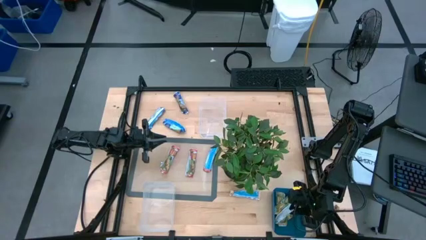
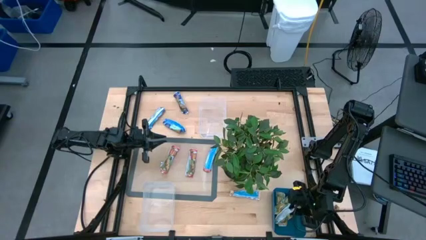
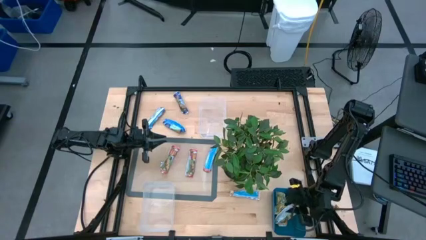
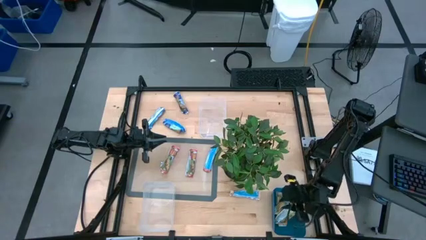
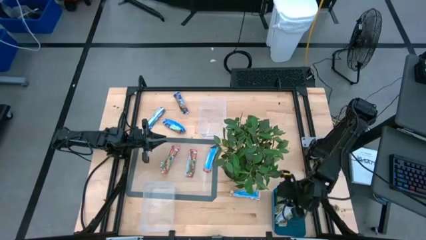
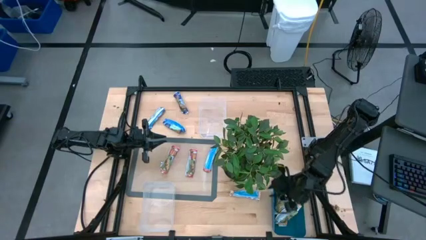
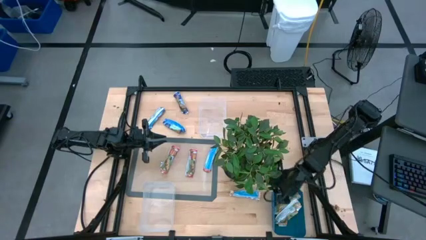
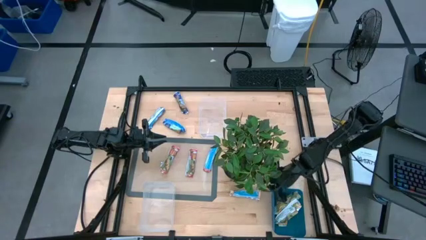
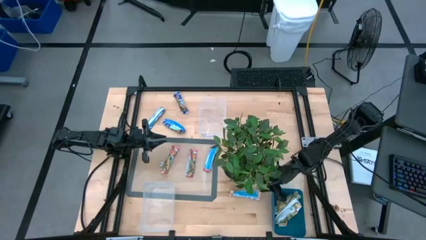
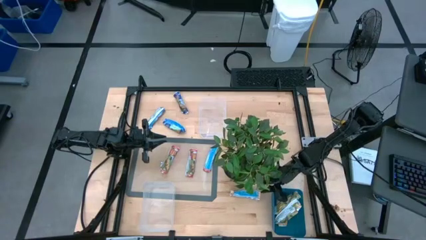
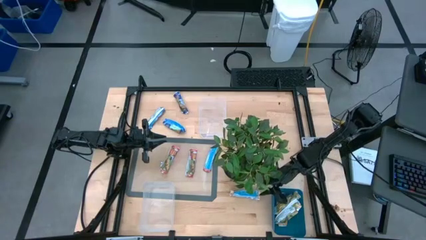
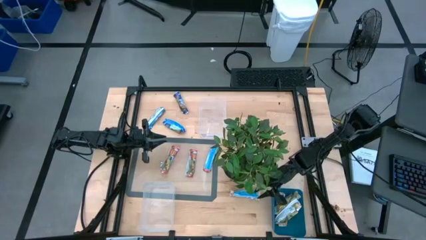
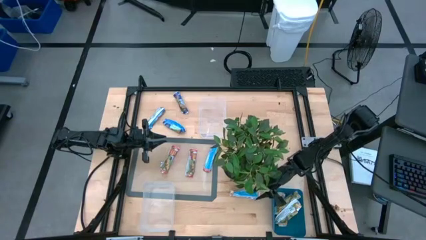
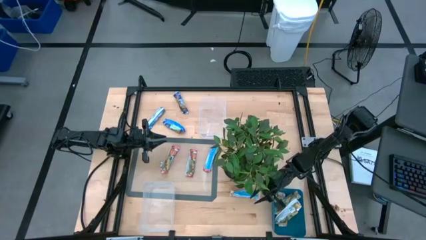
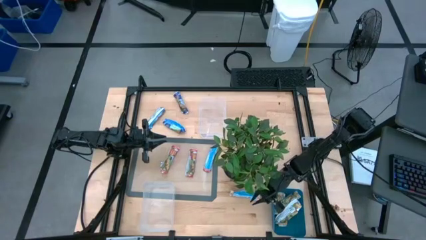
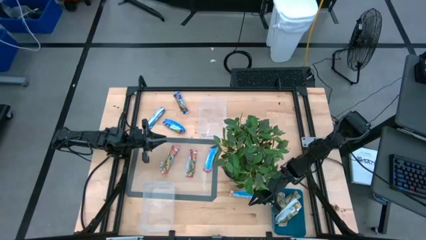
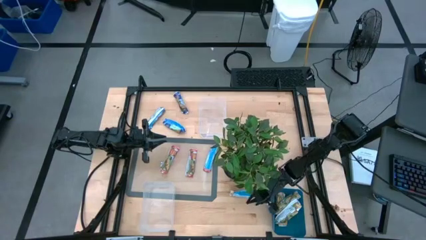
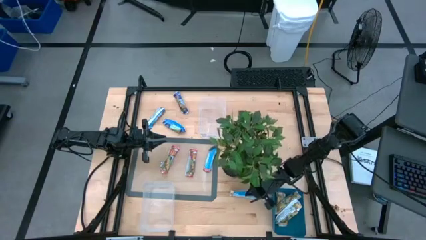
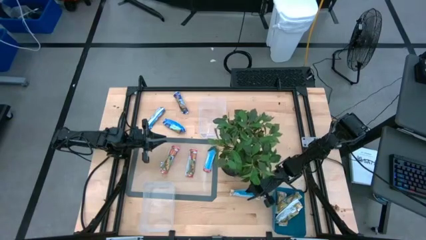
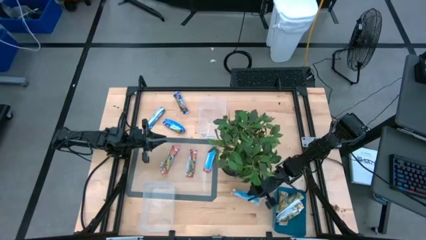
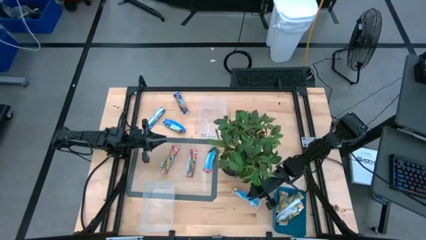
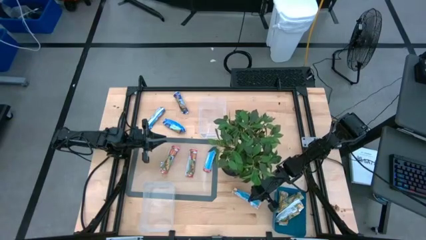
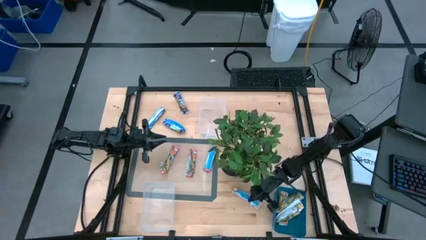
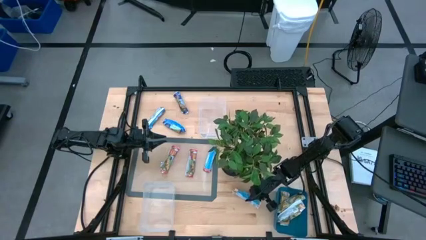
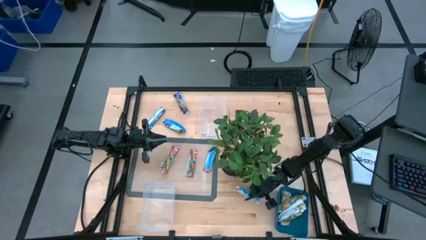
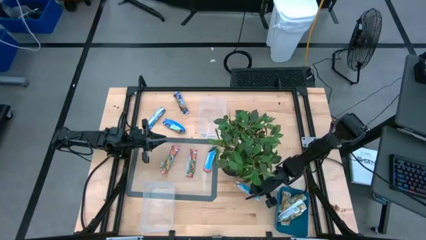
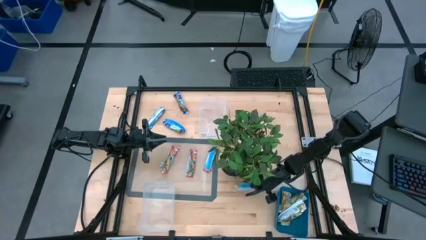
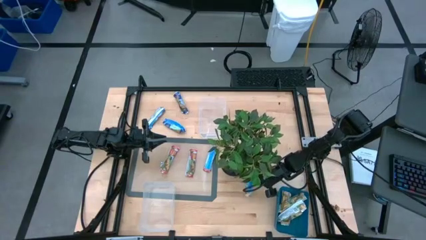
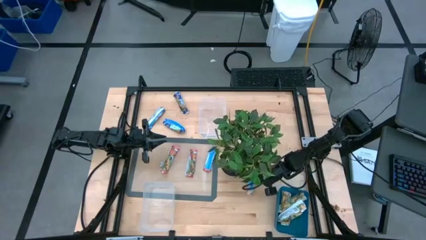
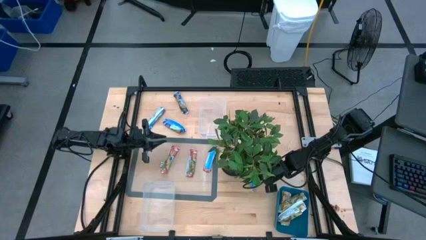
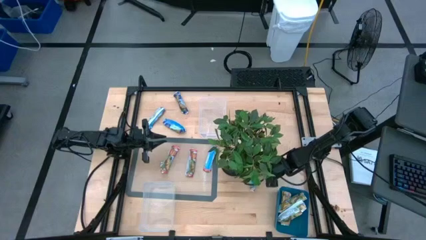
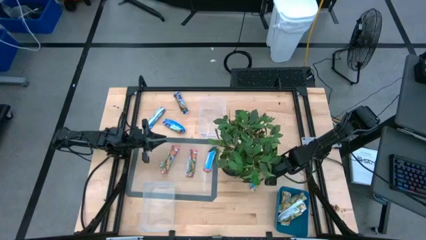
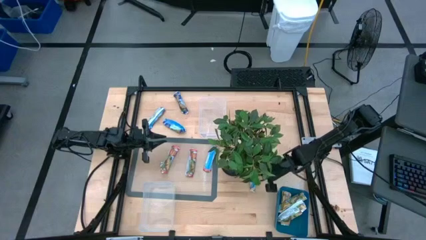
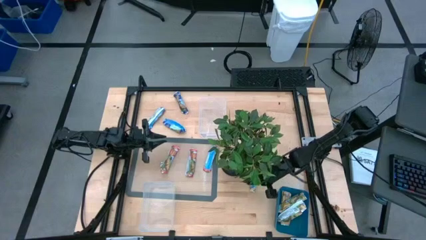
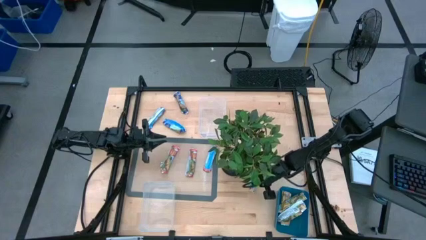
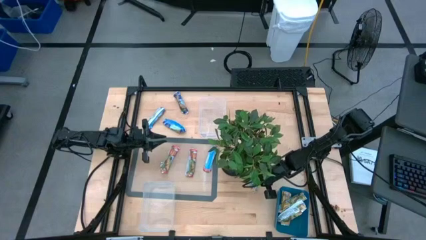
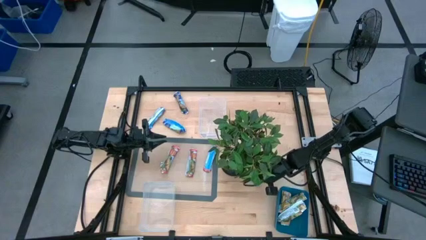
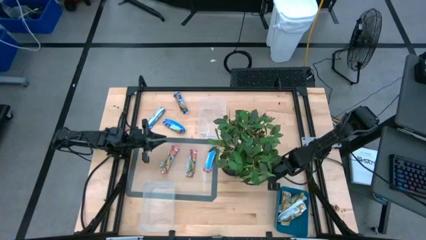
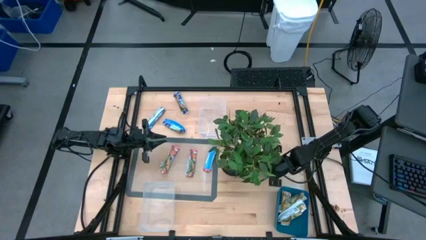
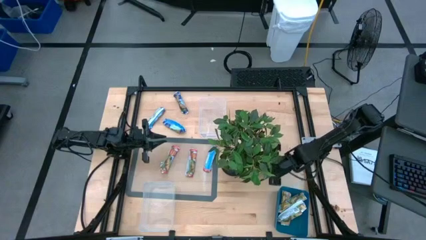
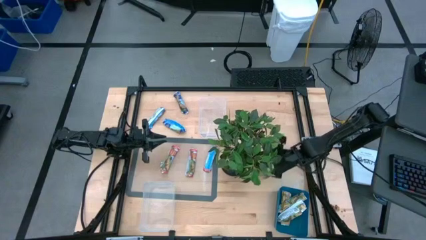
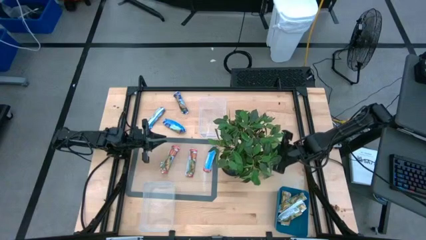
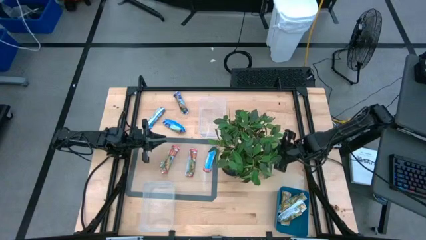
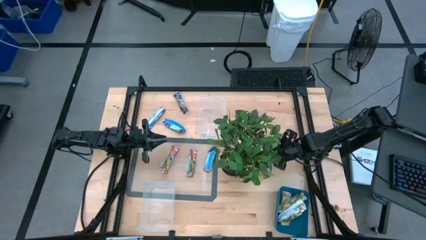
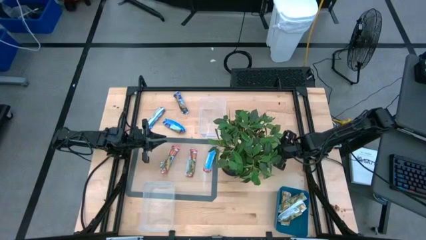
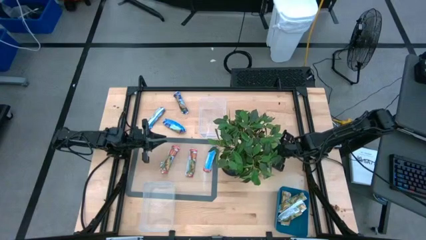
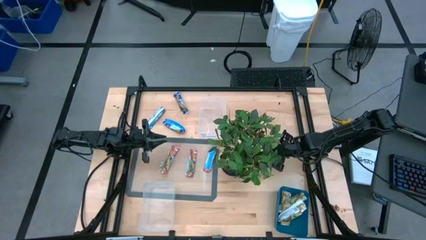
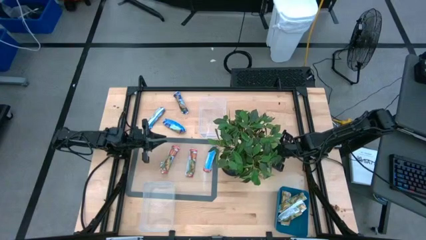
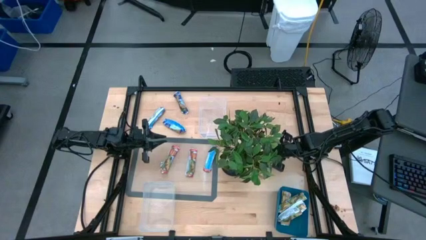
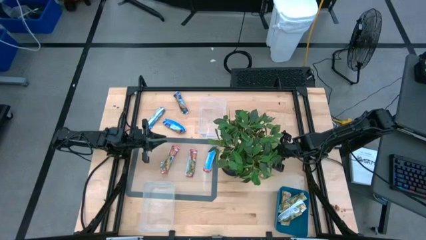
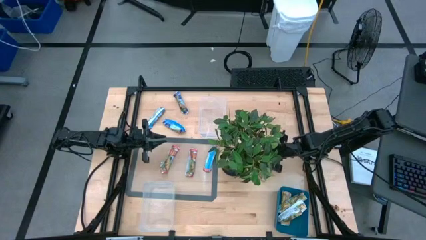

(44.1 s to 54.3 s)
Task: Pick and place Granola Bars by type
Put the green granola bar into the blue bin

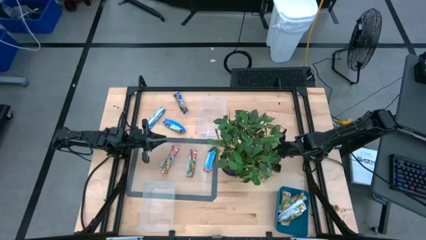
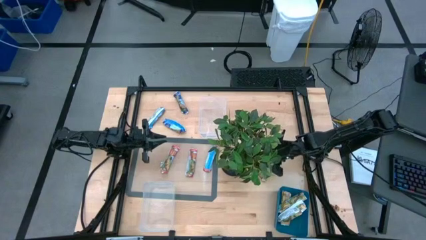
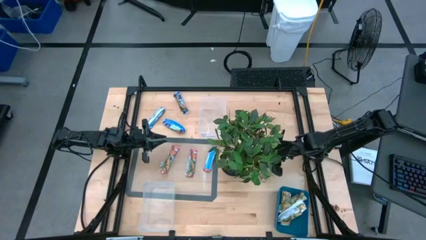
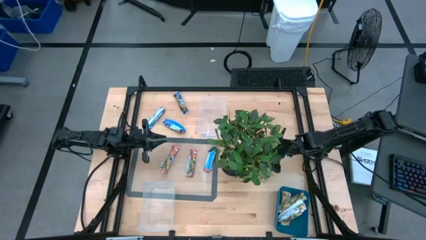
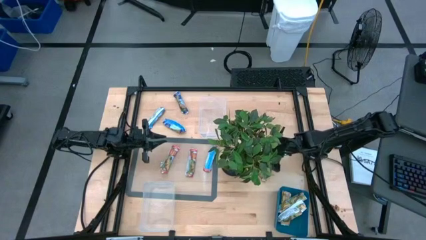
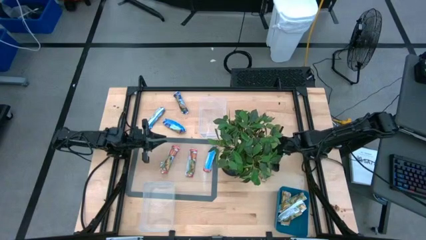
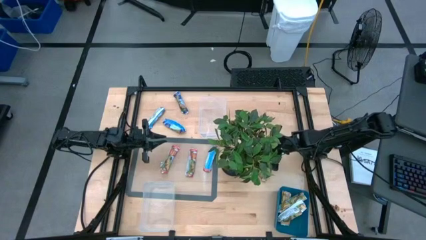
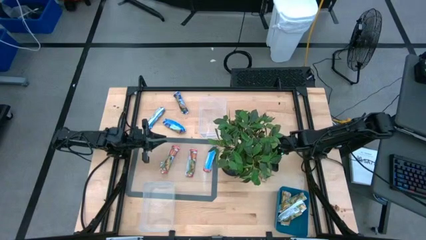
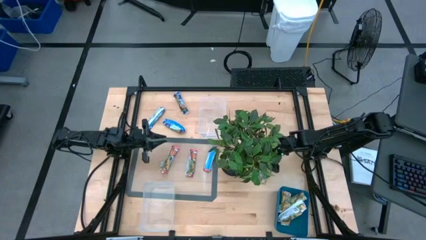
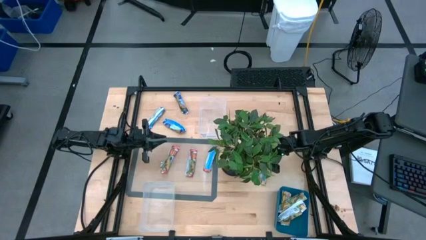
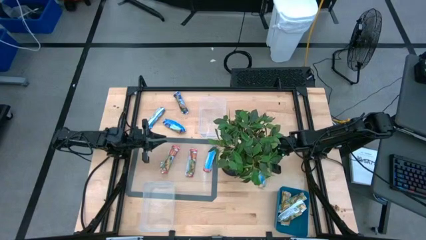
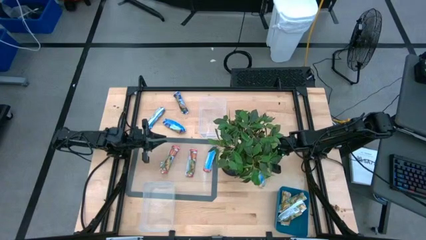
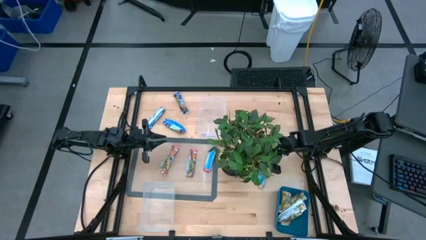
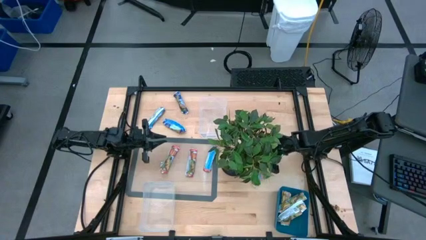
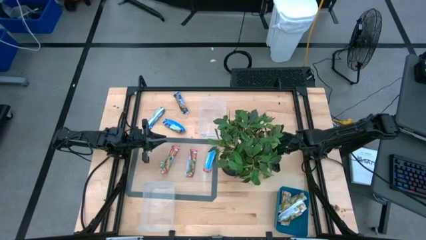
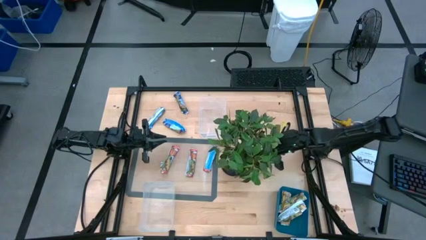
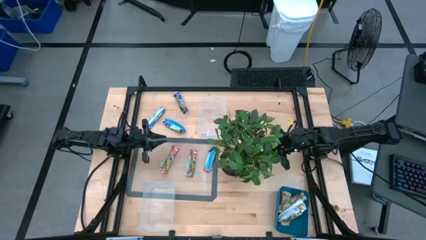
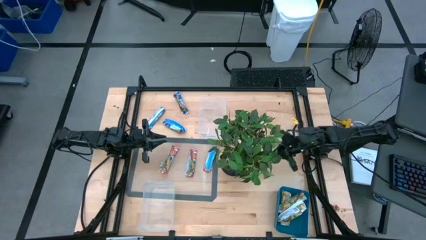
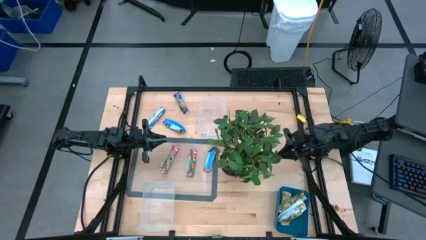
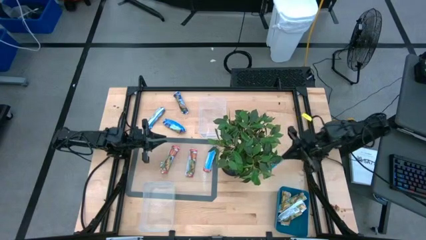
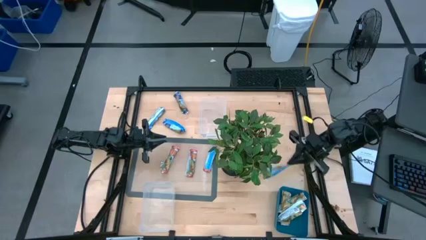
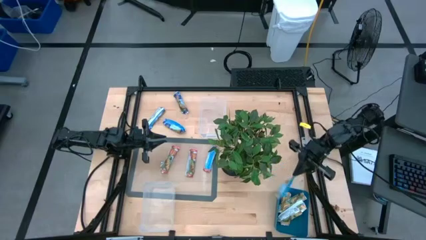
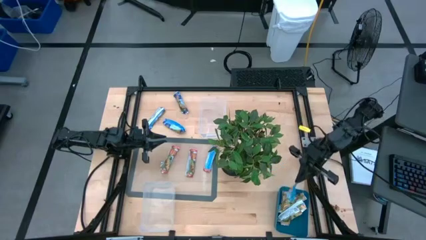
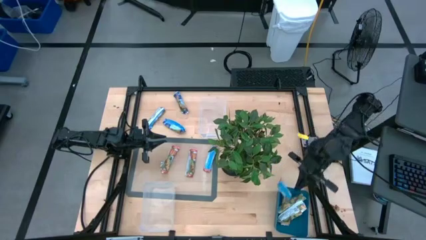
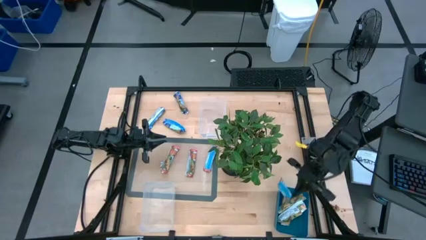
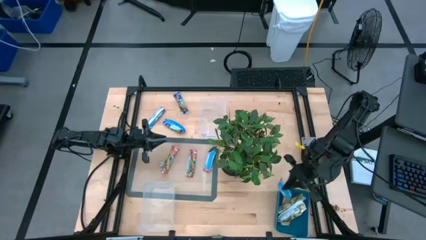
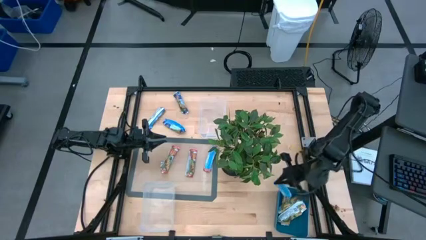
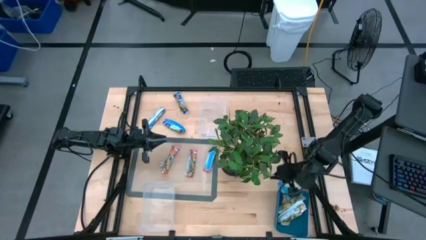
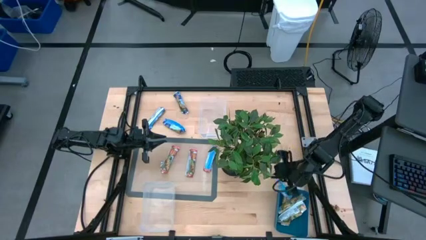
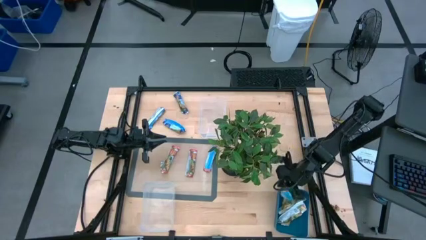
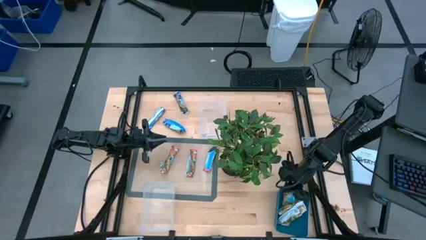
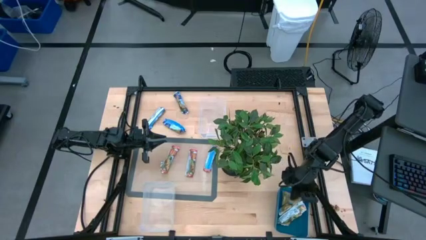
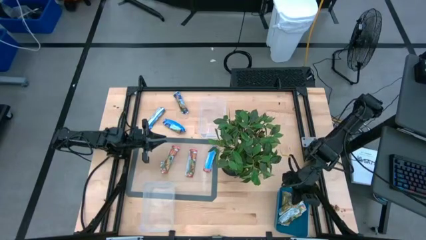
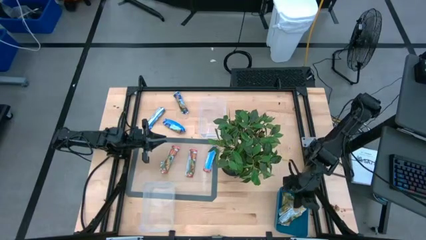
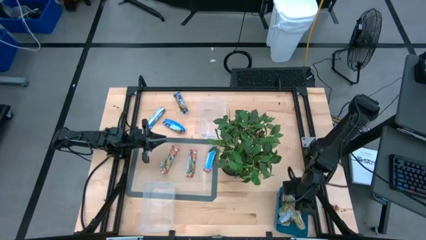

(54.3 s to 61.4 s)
Put the green granola bar into the blue bin
